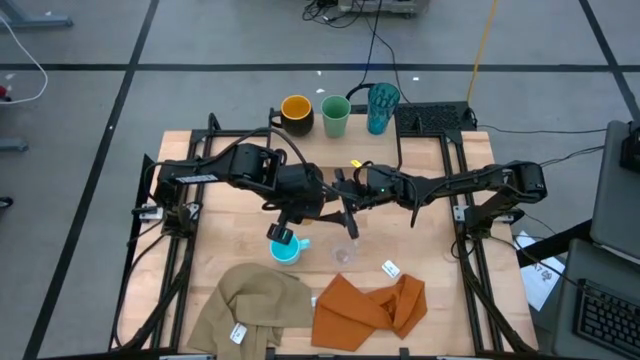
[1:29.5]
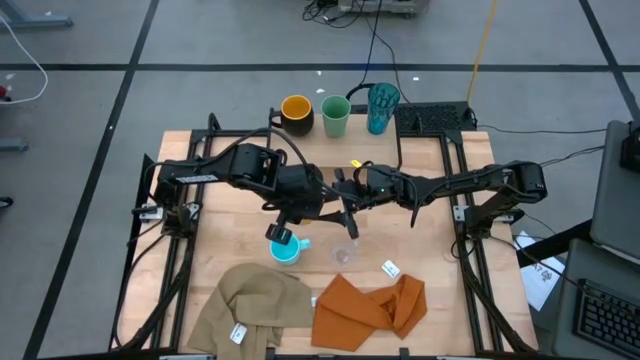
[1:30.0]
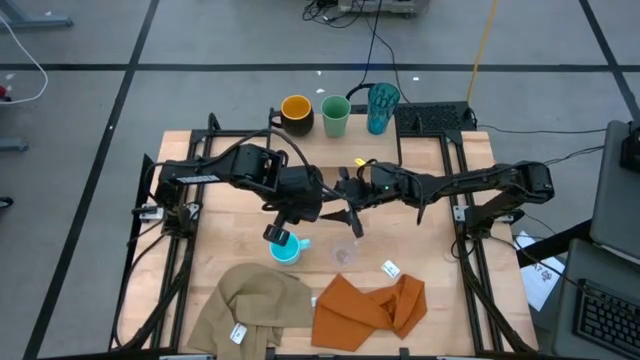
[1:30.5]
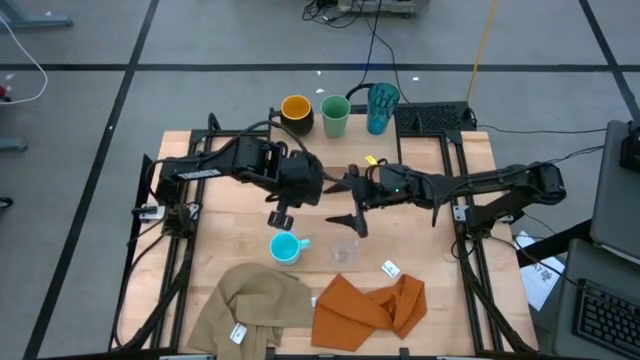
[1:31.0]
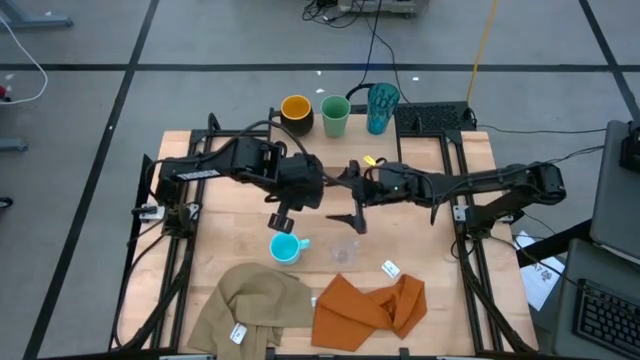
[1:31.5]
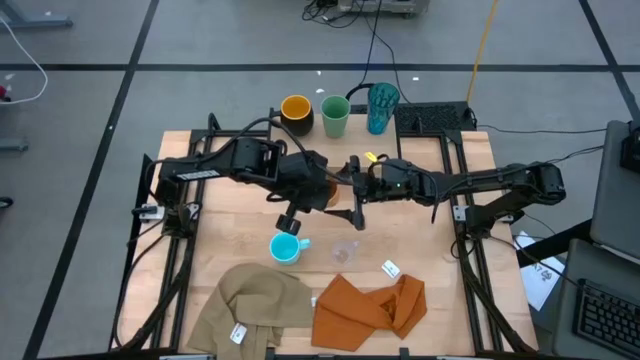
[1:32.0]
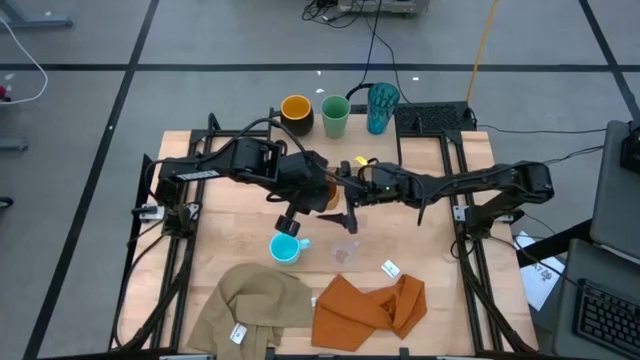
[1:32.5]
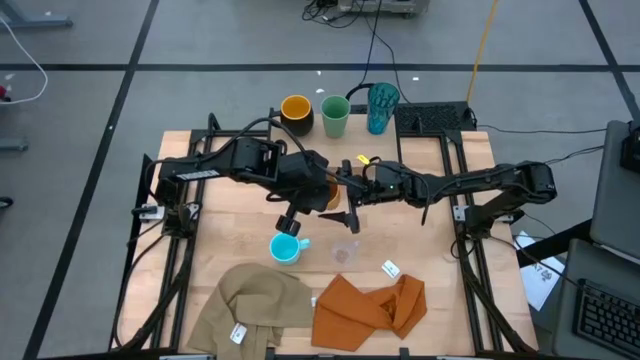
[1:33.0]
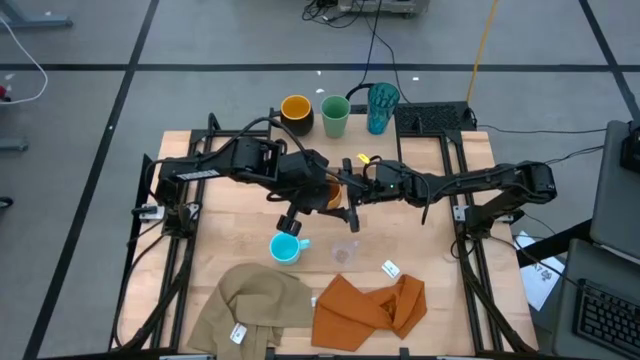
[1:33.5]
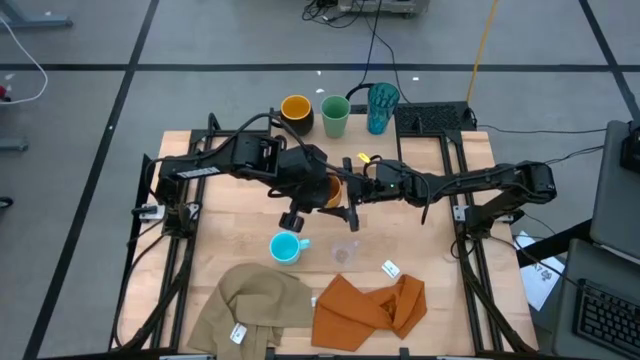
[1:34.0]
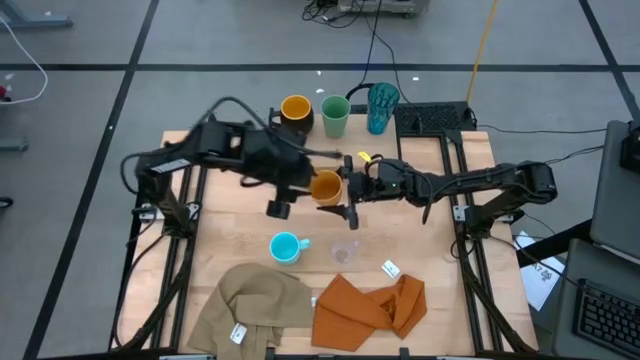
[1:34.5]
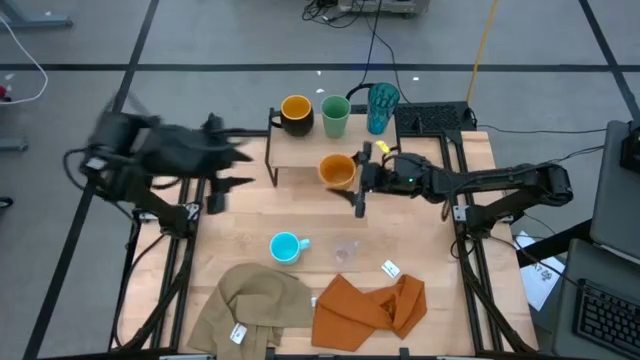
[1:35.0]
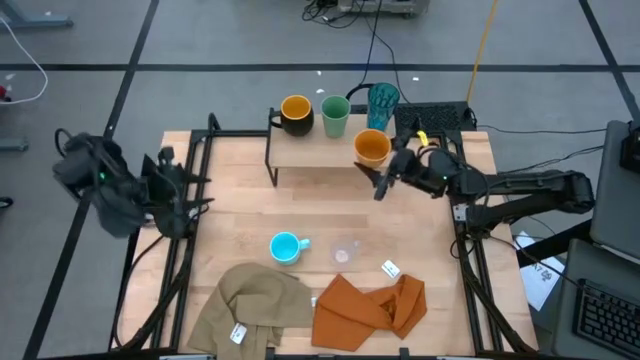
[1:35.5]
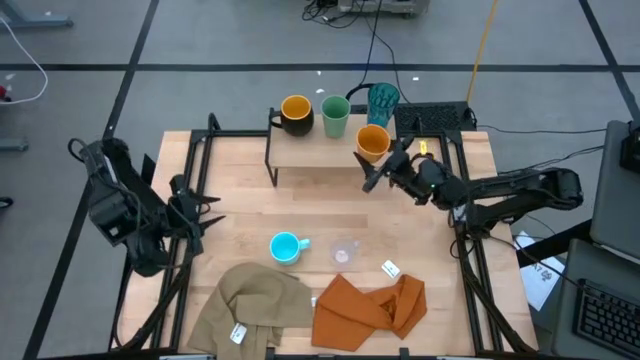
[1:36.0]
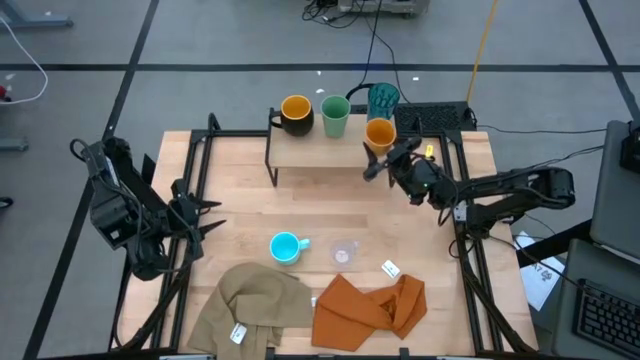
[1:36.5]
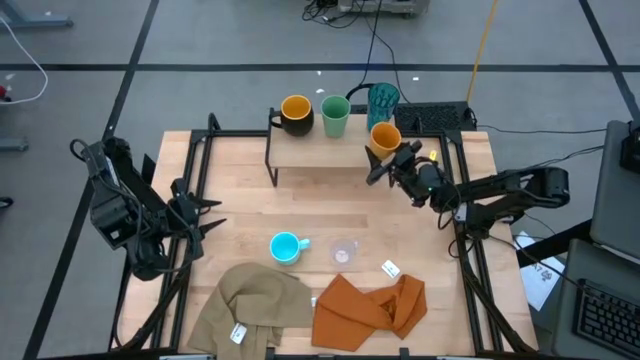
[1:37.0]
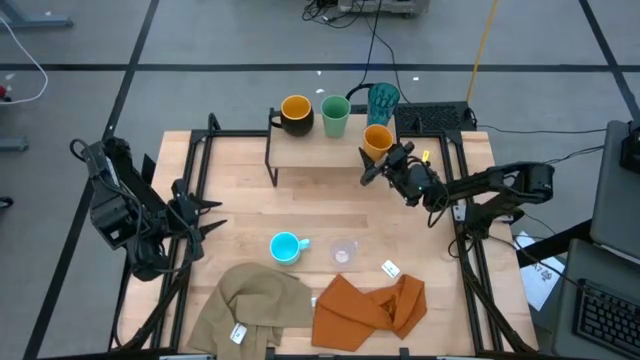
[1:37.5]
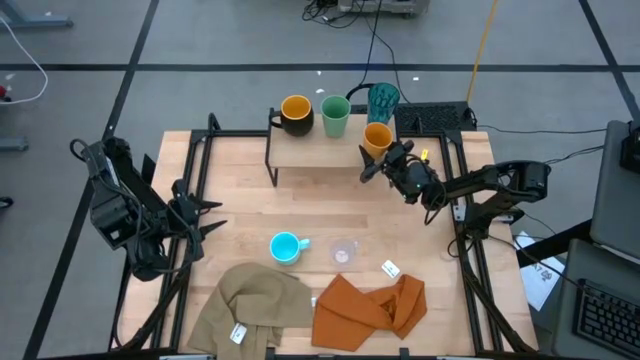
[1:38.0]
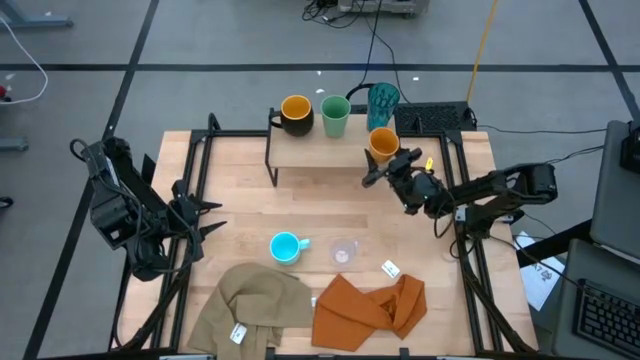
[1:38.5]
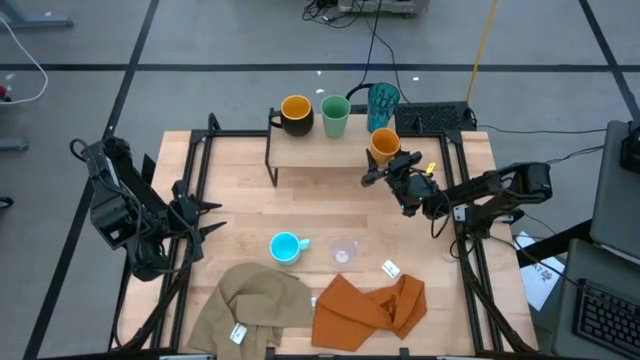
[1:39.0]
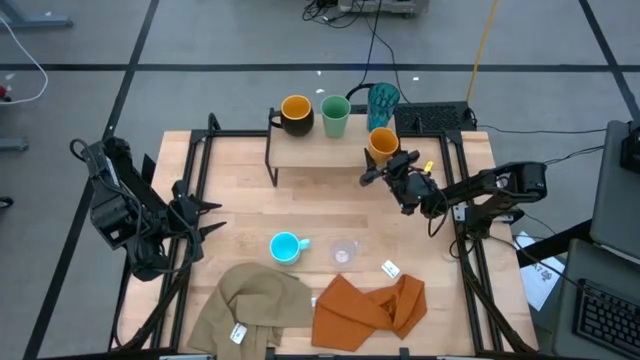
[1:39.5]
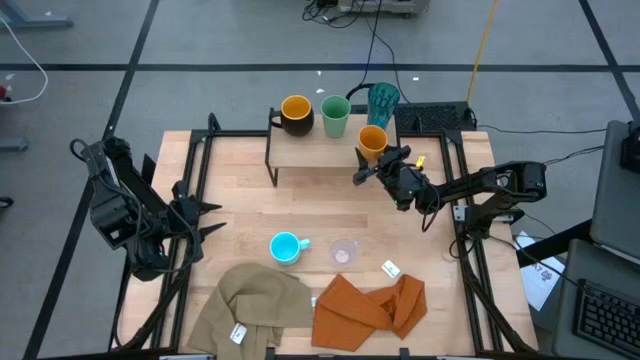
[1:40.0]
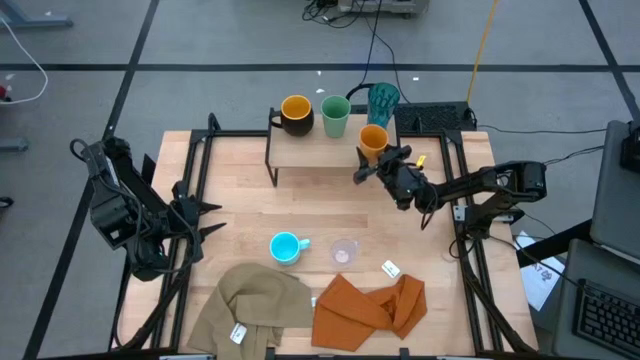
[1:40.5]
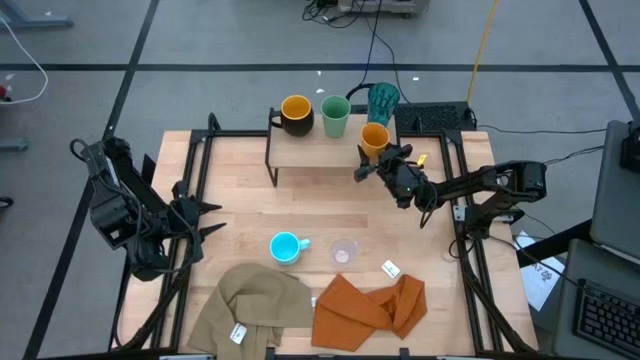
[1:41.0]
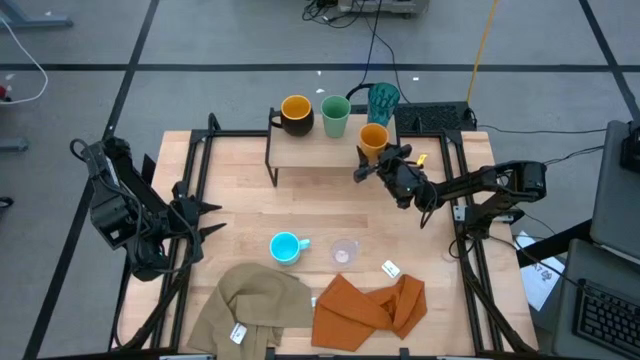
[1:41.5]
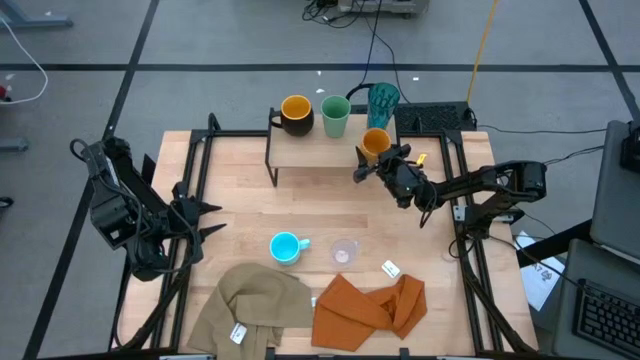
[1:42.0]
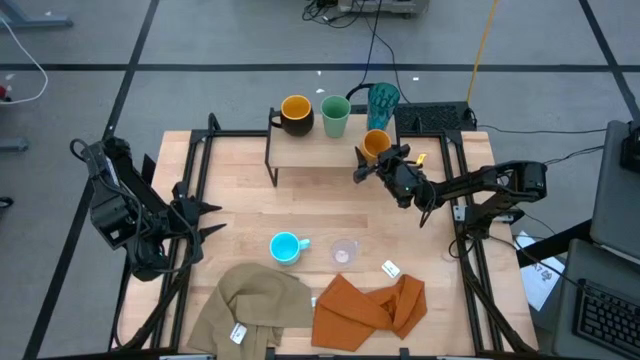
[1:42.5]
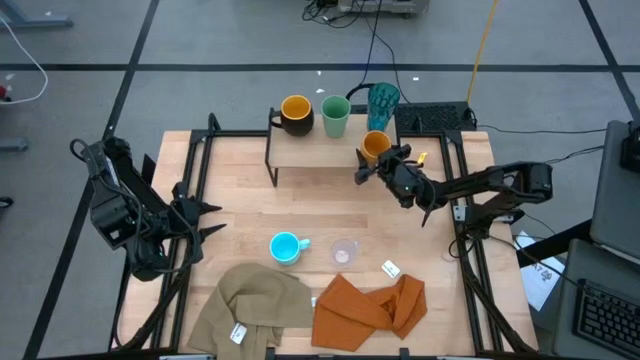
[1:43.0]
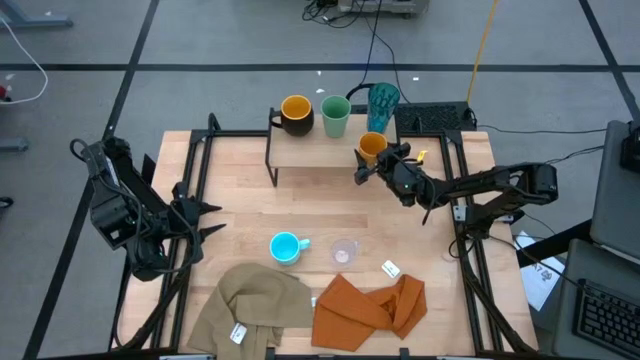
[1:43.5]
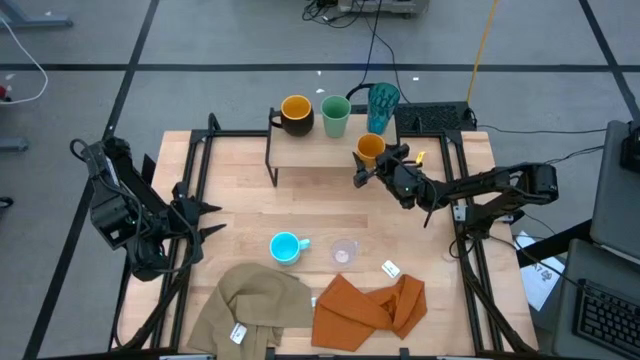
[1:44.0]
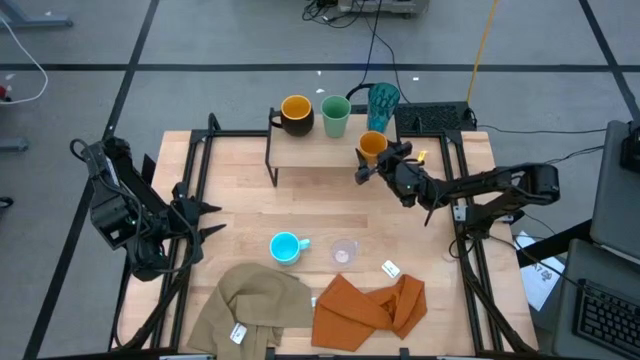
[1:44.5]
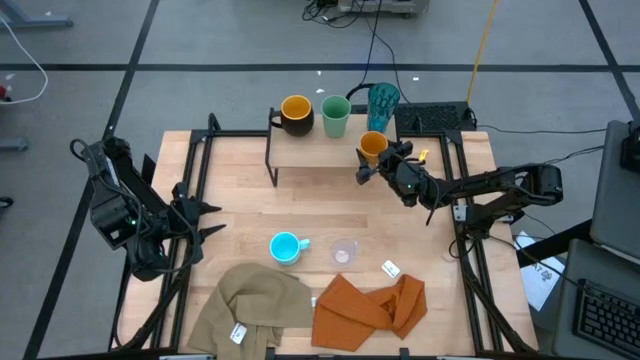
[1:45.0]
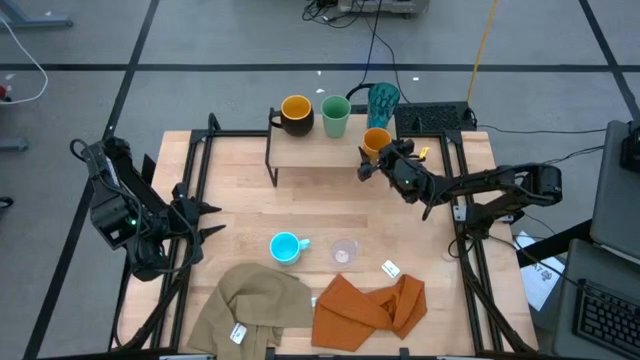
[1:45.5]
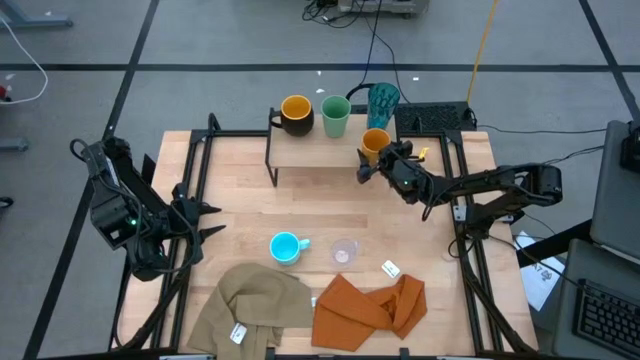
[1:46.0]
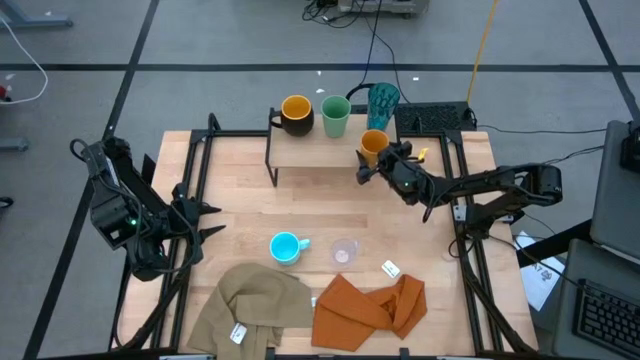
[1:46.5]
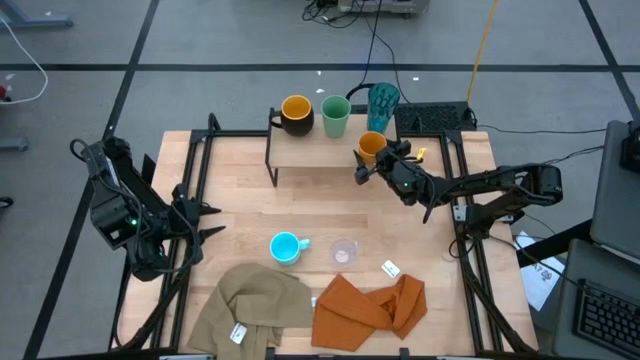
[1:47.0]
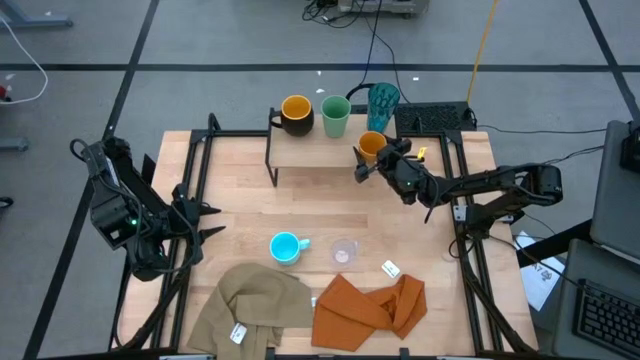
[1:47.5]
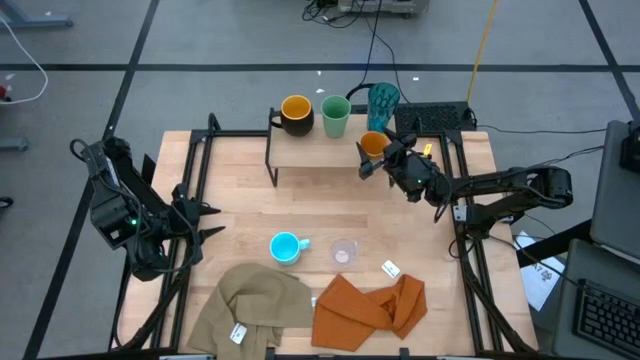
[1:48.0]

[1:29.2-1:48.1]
Task: Stack small to large cups/mugs on shelf
Put the orange cup on the shelf

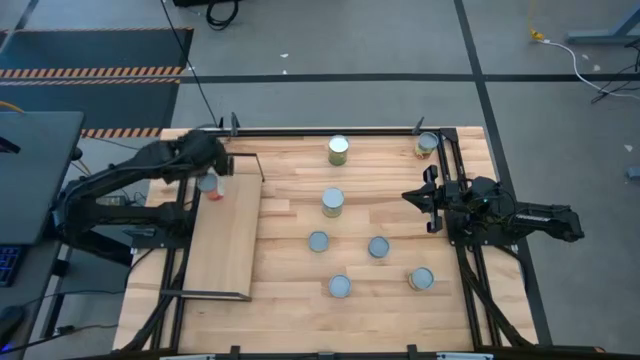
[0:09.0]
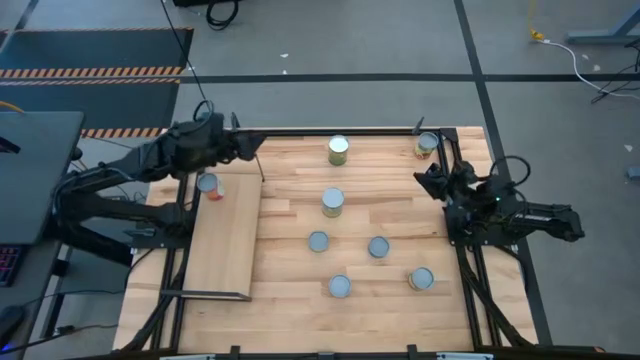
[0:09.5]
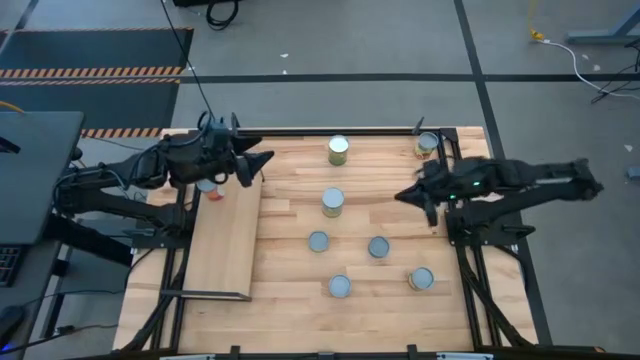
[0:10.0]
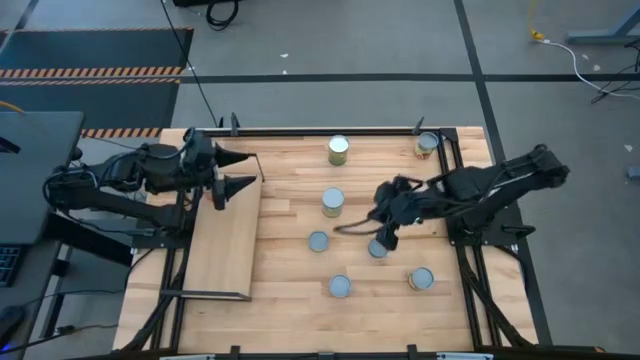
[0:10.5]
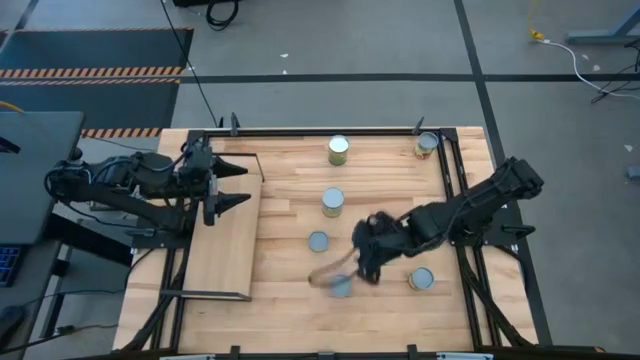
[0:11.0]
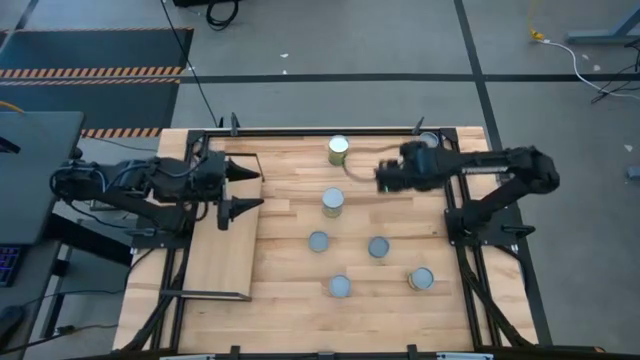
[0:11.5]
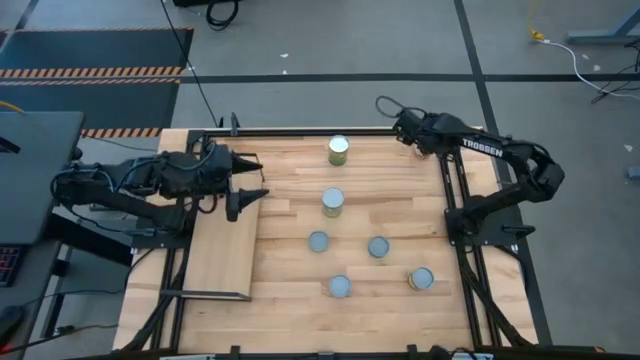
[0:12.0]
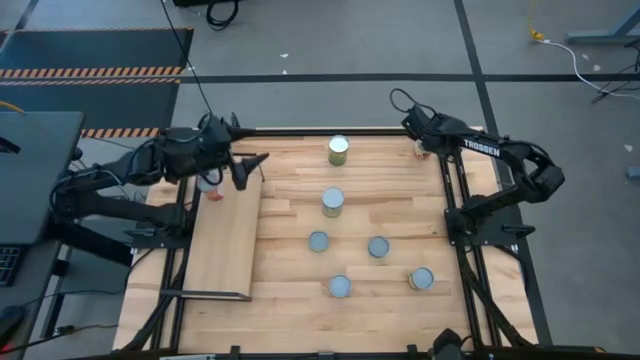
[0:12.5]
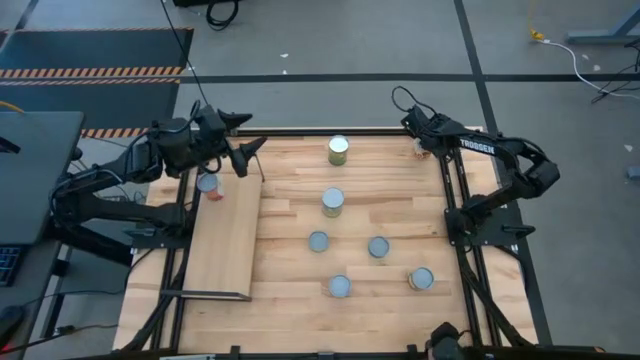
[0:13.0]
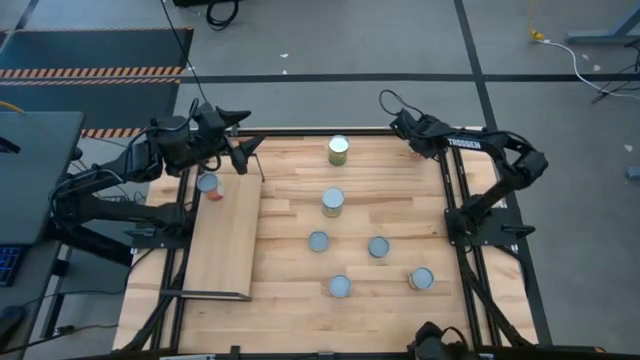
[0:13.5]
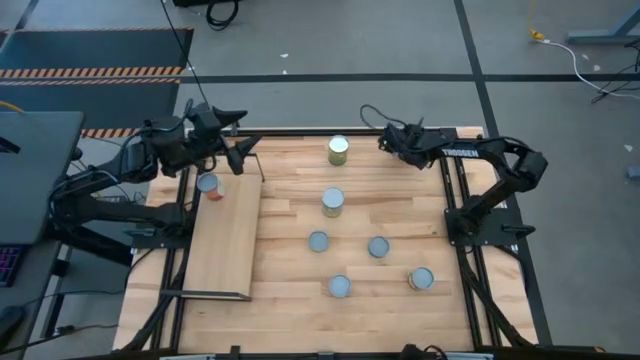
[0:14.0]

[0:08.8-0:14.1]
Task: Pick and place cans onto a shelf
Put the canned spaghetti sauce on the shelf
